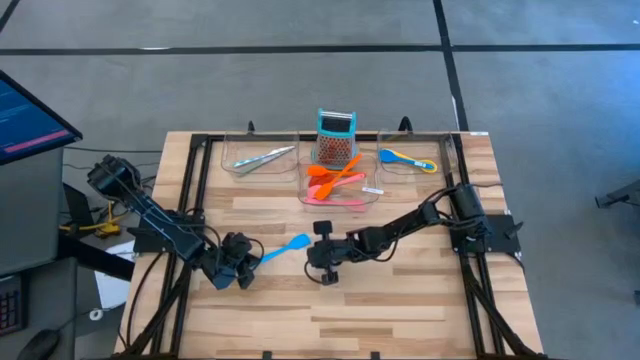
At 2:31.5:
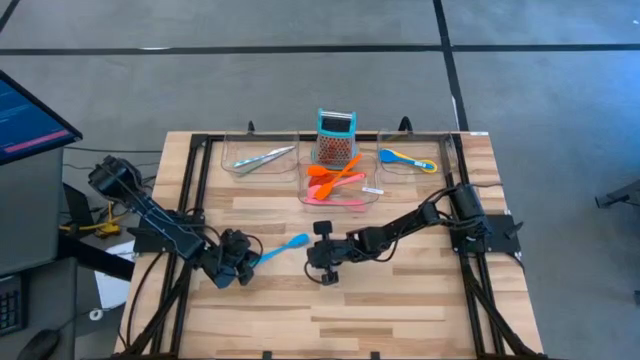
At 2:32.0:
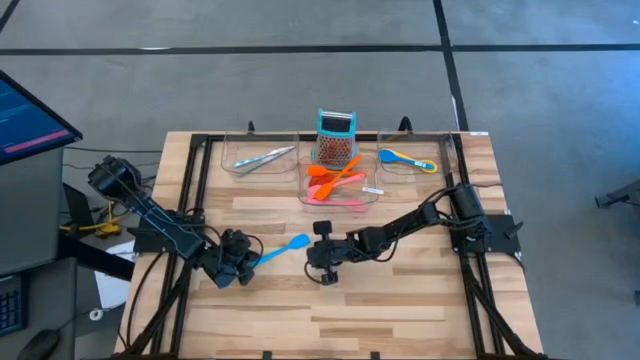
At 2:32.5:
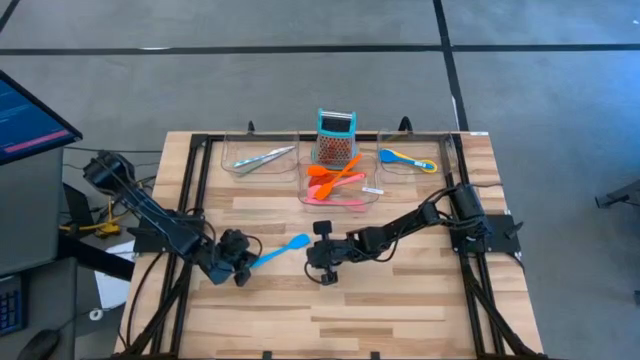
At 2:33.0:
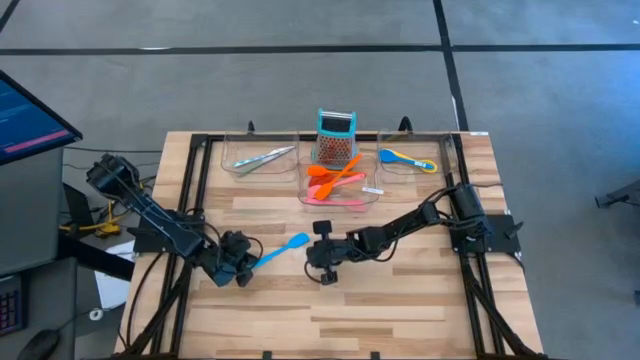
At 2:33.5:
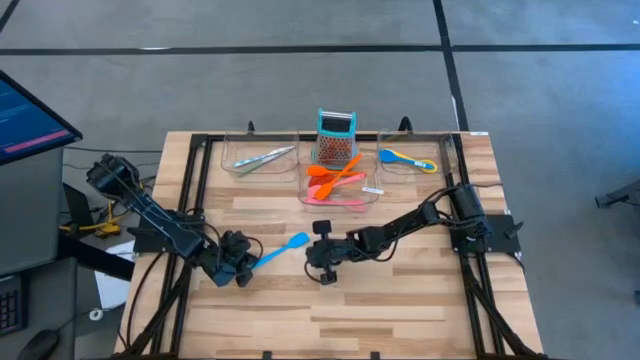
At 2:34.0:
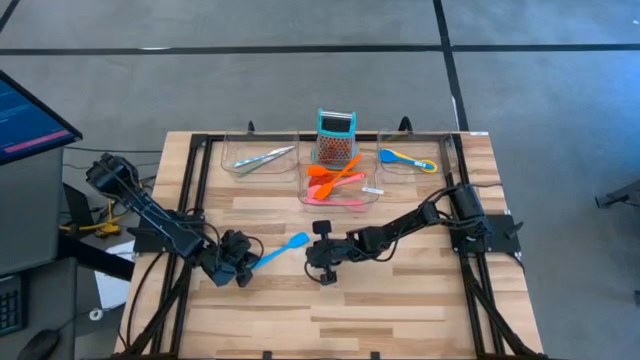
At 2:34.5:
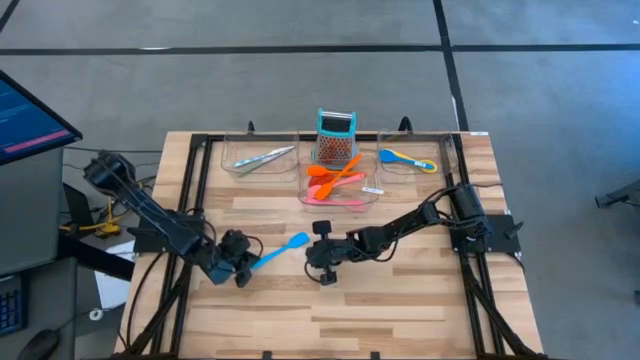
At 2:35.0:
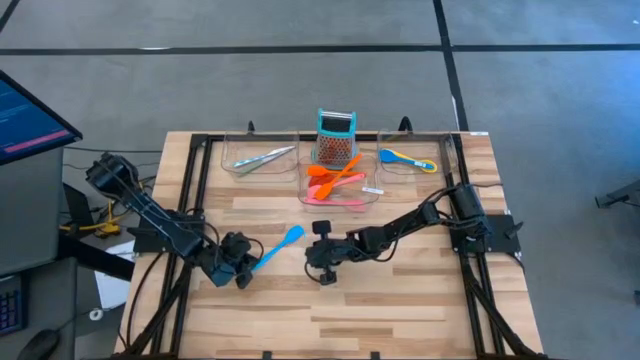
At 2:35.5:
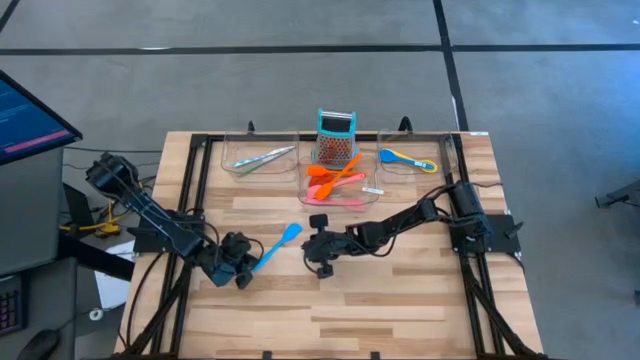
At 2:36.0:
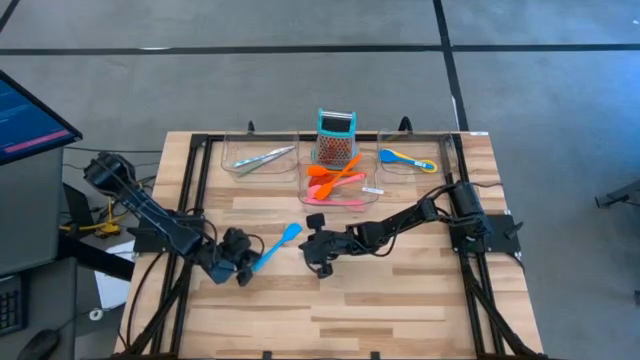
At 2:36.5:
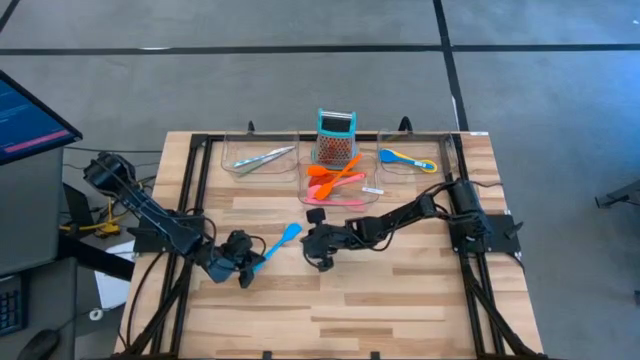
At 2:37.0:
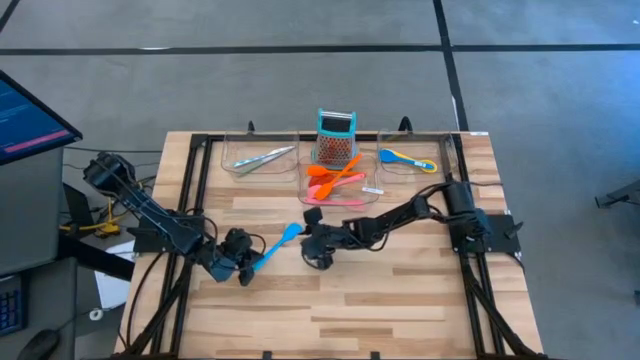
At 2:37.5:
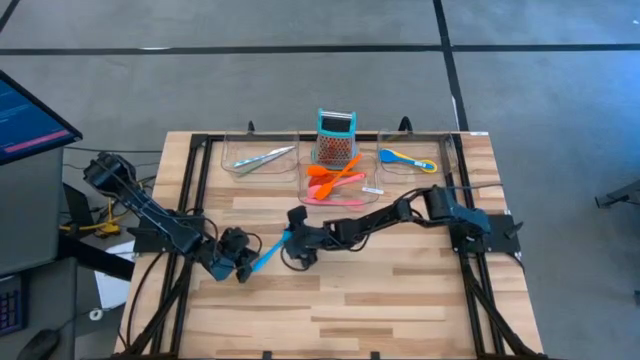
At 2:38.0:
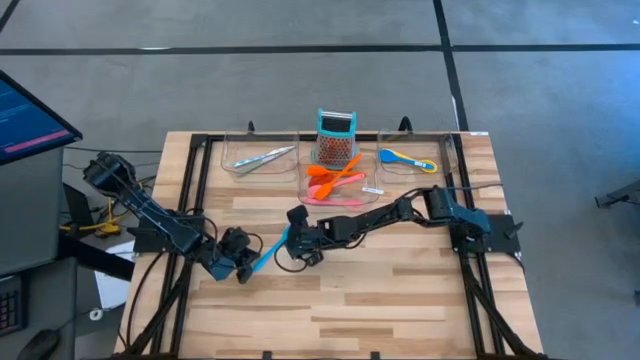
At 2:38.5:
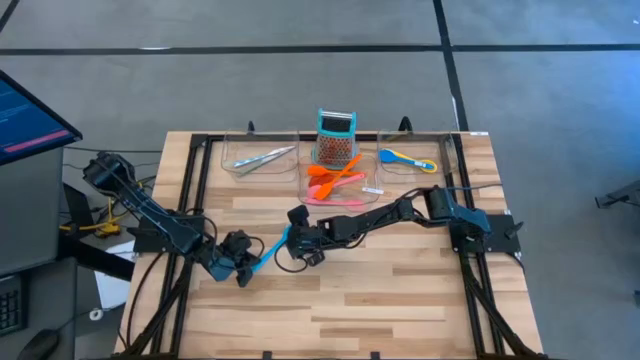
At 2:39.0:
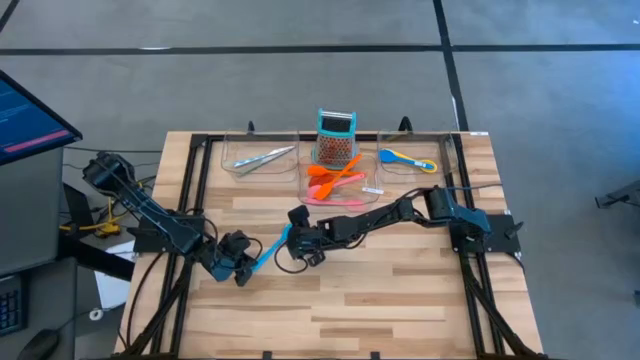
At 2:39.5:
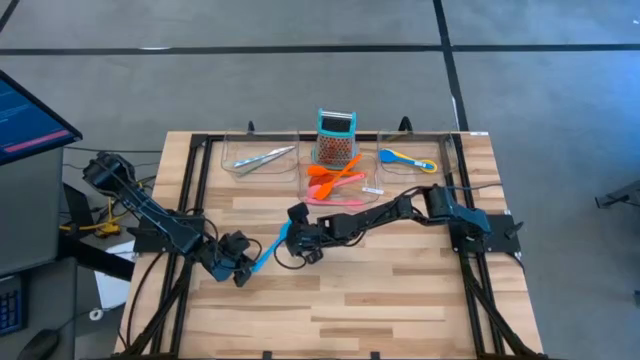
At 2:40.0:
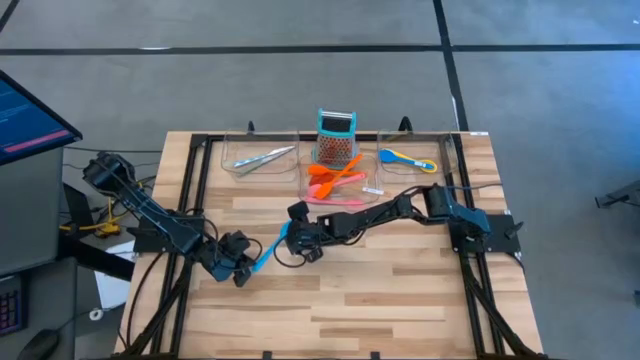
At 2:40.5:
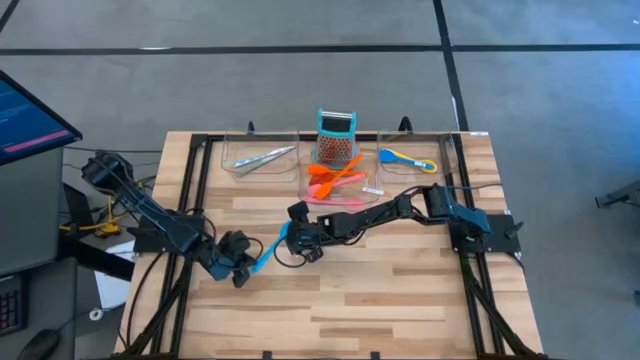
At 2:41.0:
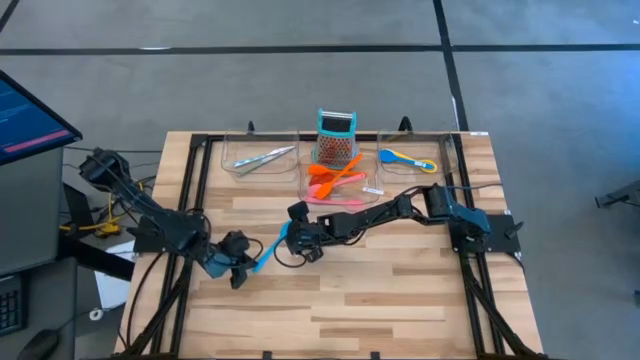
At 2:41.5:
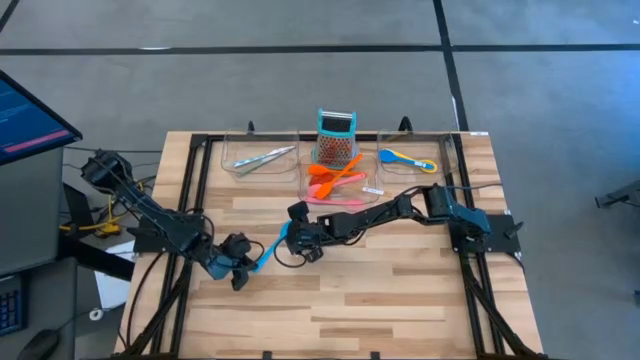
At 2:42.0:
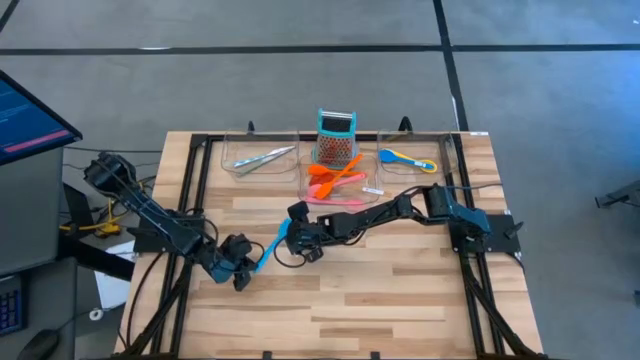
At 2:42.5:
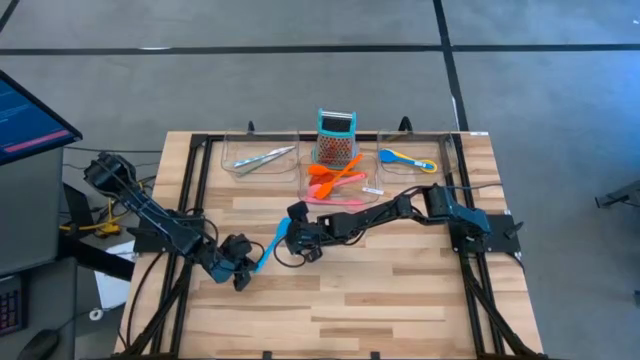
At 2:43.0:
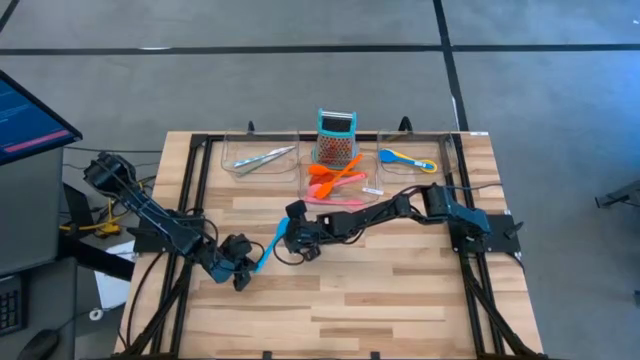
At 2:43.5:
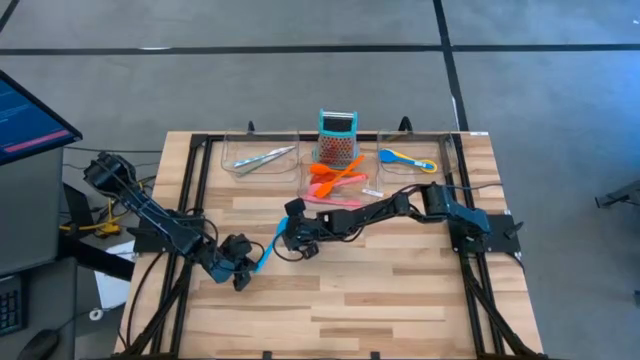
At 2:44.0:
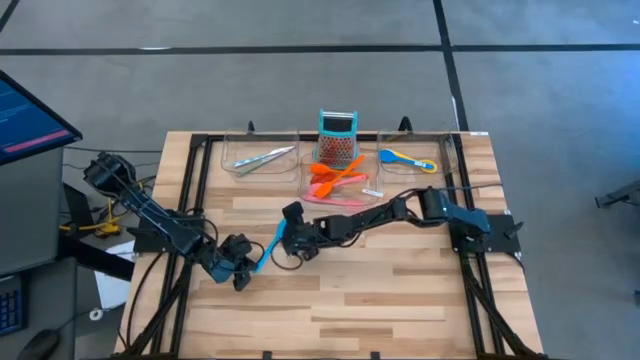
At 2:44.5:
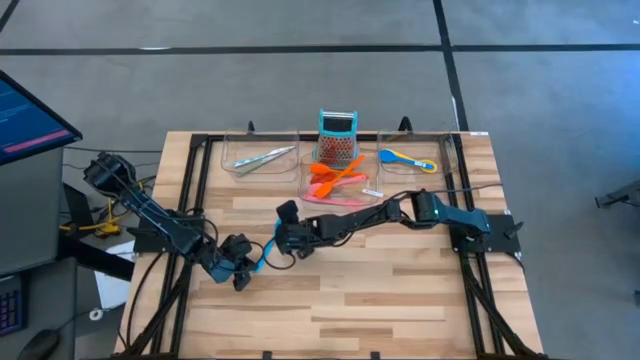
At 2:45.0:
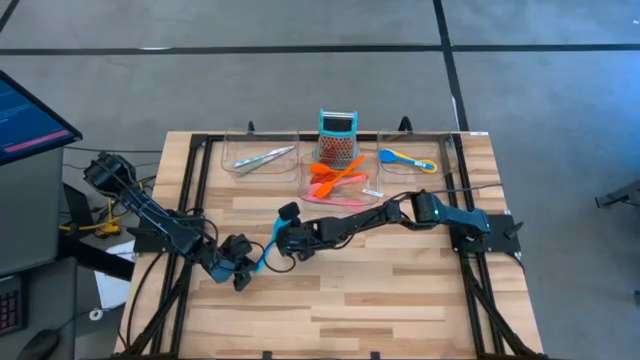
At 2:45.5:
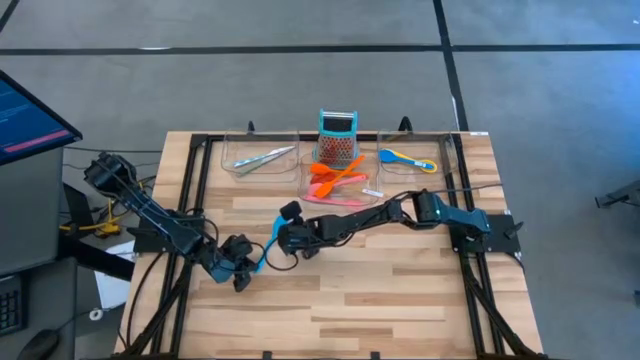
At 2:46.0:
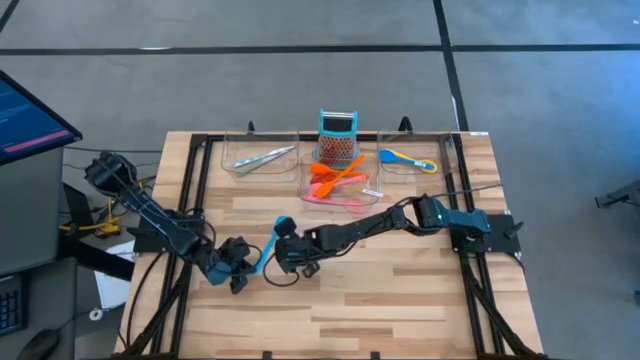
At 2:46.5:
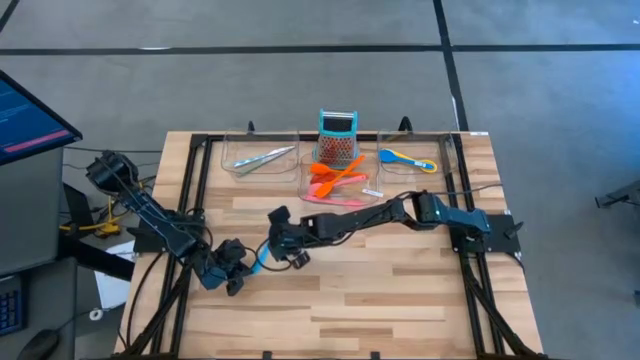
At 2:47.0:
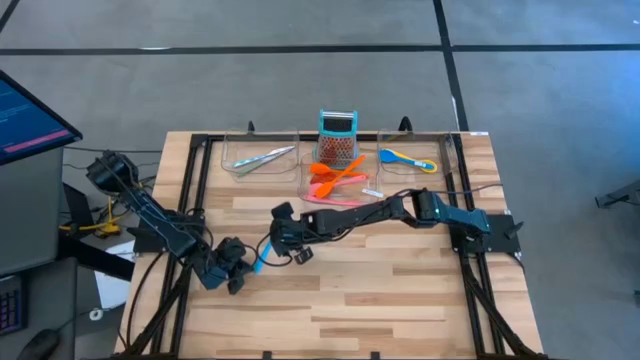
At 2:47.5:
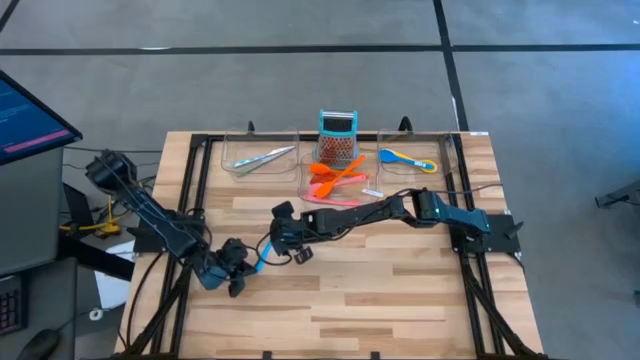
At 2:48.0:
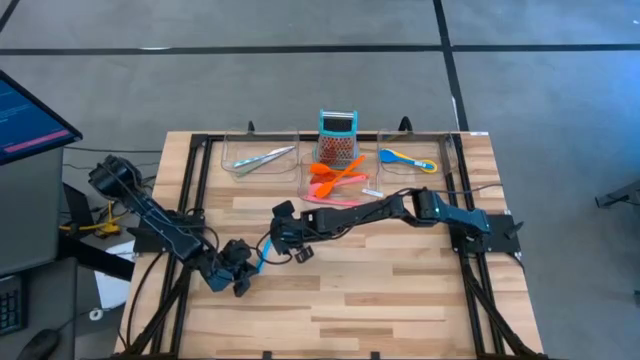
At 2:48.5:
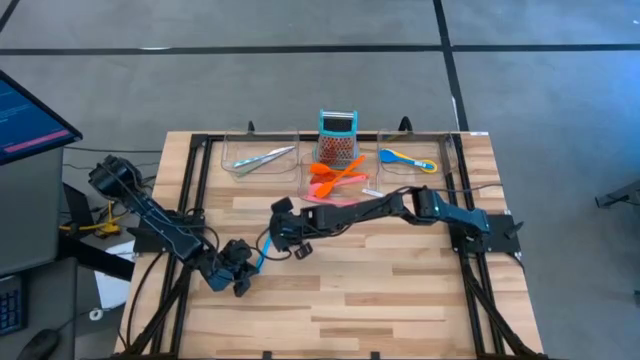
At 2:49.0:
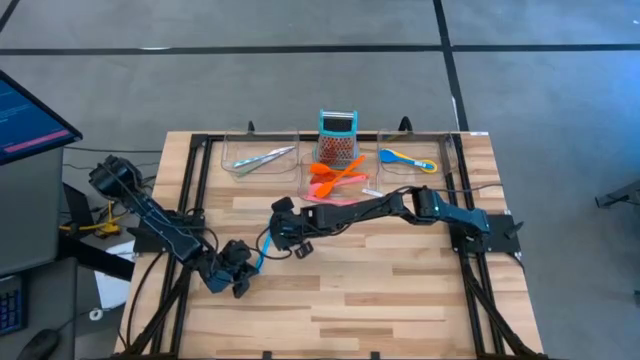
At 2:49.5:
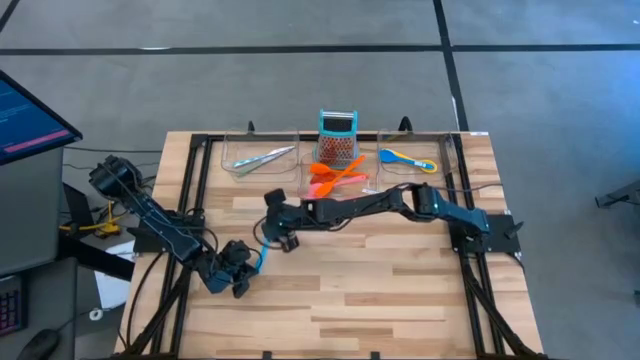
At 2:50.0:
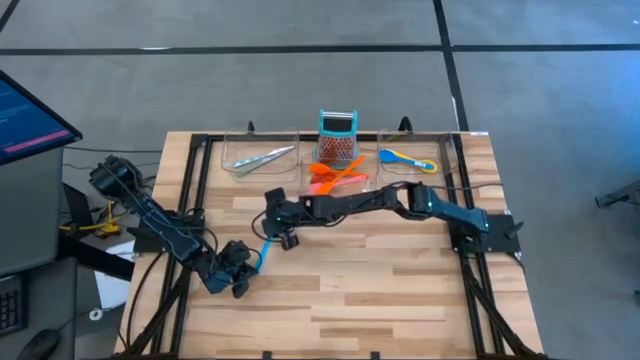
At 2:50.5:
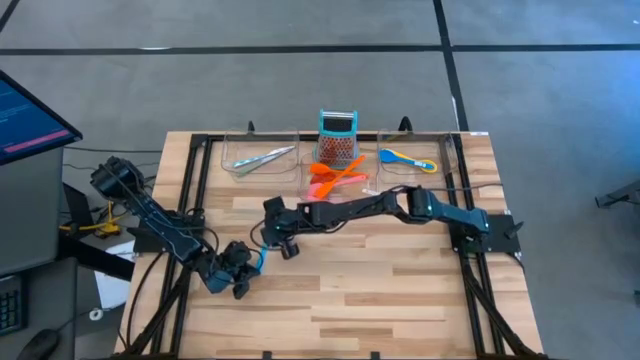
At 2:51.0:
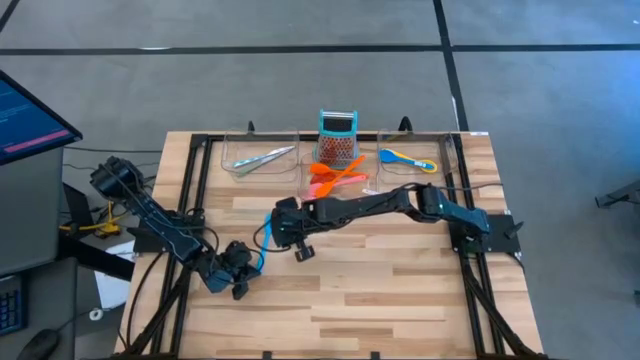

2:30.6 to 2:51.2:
Task: Pick & Place Kitchen Items
Put the blue spatula into the middle transparent bin
